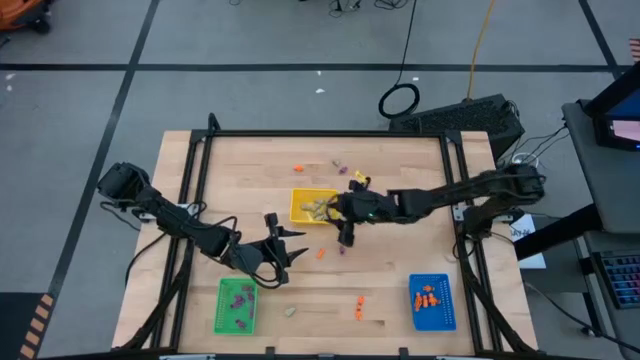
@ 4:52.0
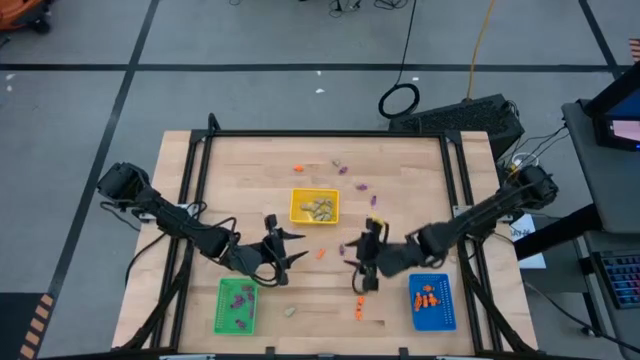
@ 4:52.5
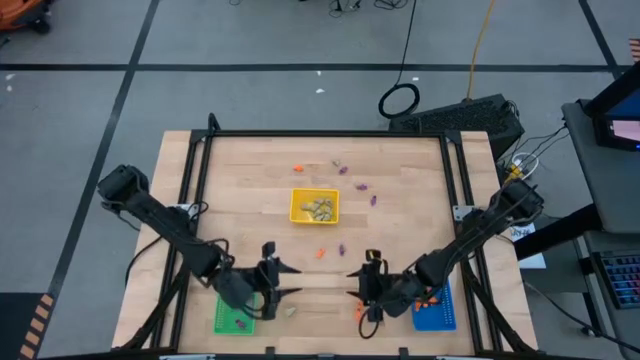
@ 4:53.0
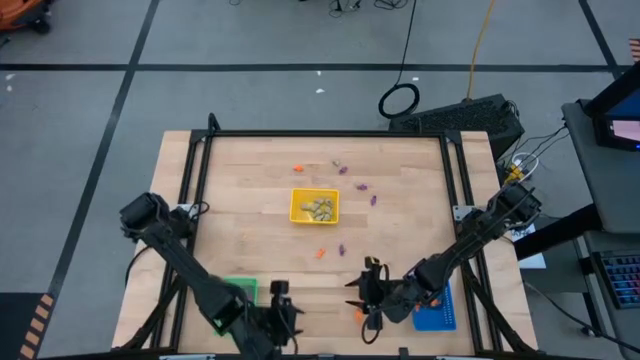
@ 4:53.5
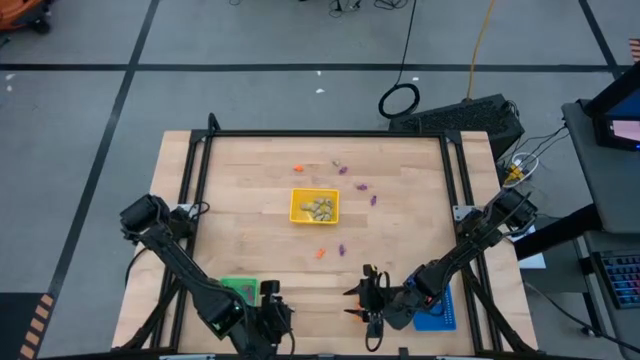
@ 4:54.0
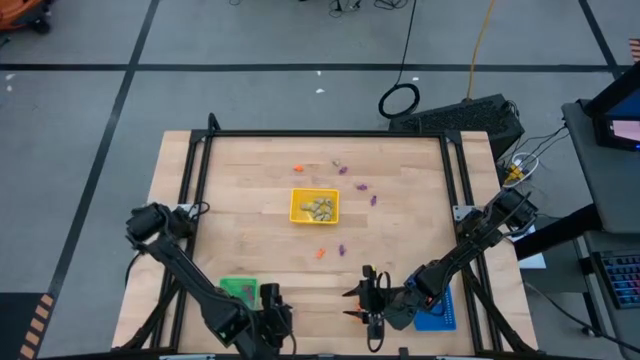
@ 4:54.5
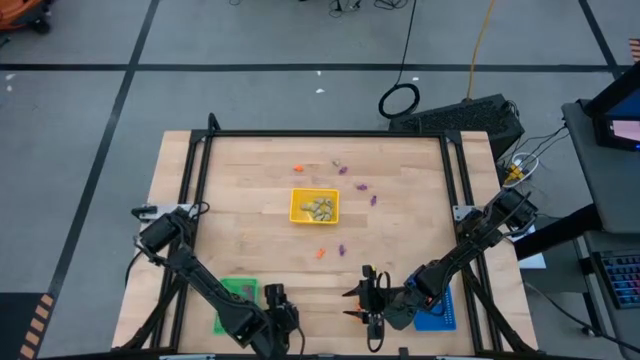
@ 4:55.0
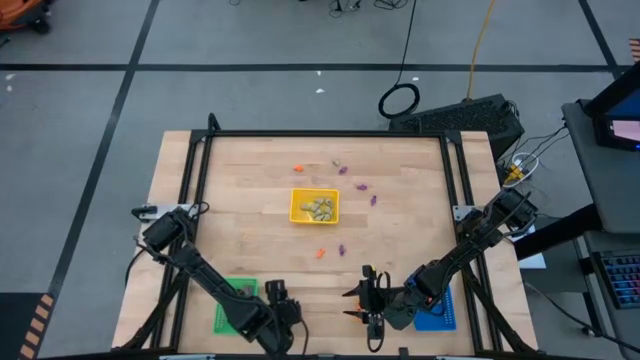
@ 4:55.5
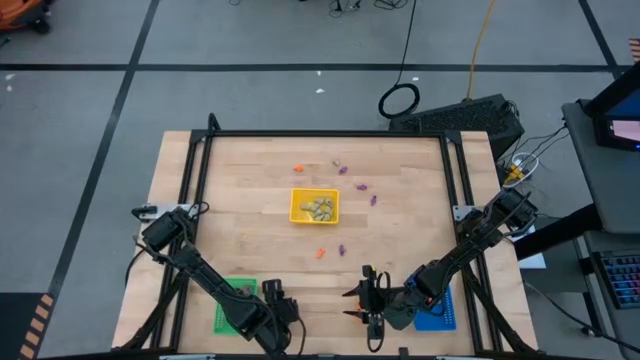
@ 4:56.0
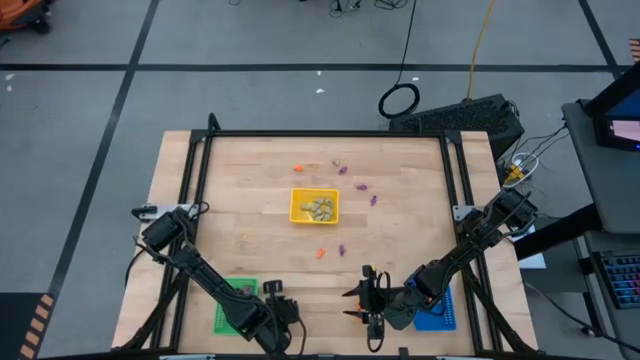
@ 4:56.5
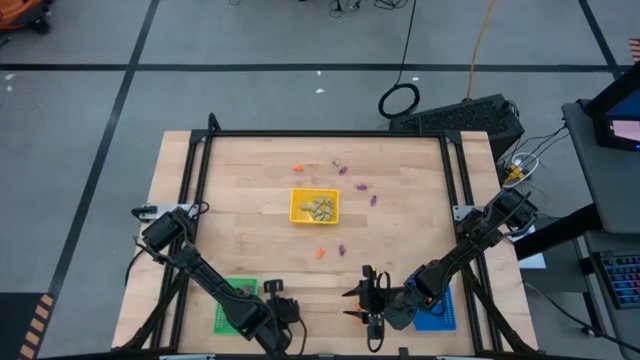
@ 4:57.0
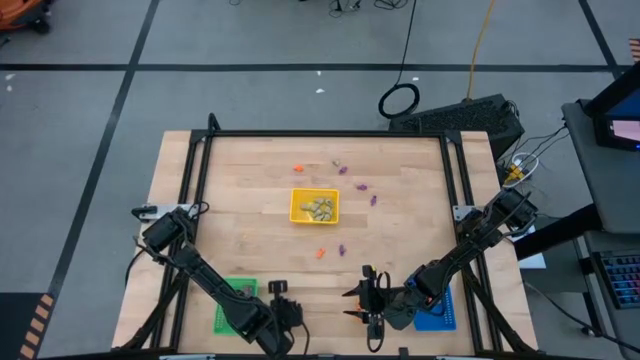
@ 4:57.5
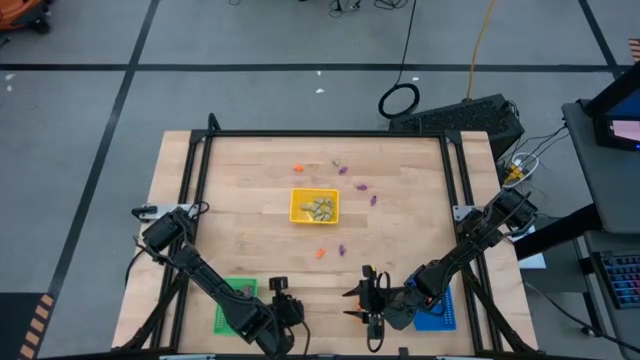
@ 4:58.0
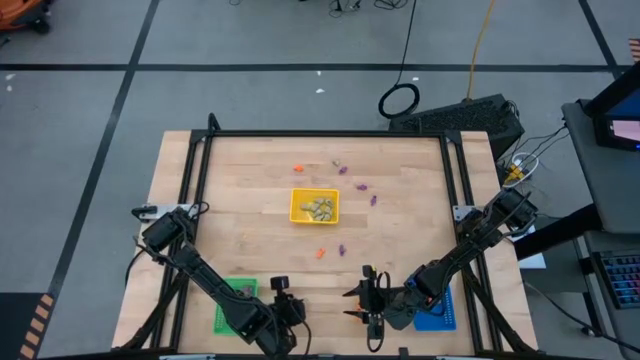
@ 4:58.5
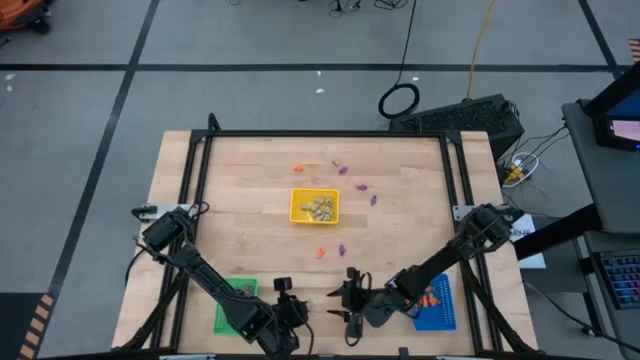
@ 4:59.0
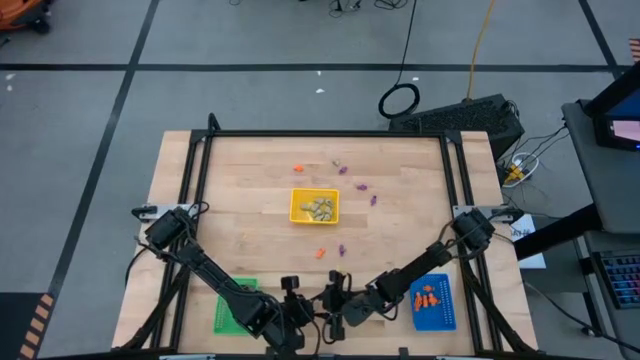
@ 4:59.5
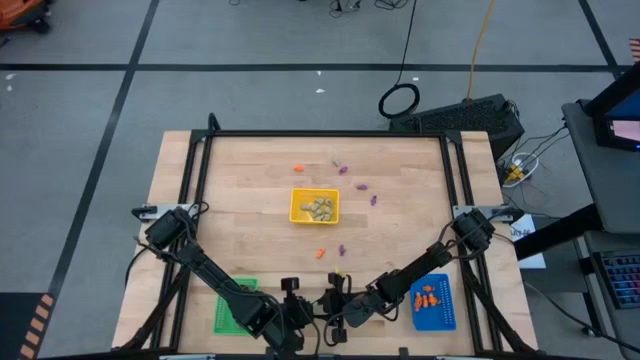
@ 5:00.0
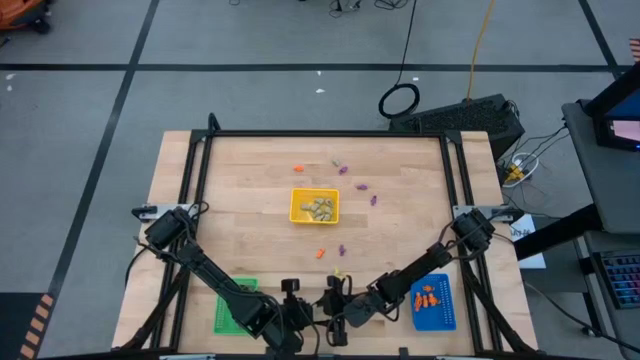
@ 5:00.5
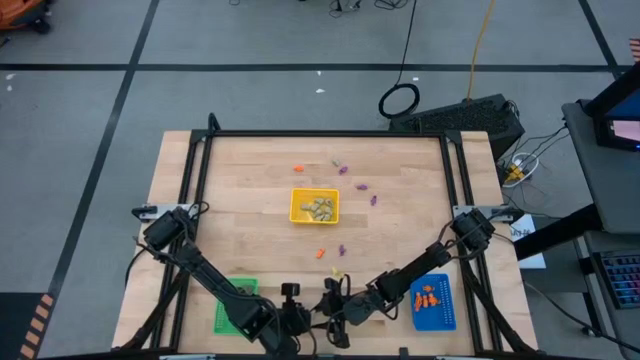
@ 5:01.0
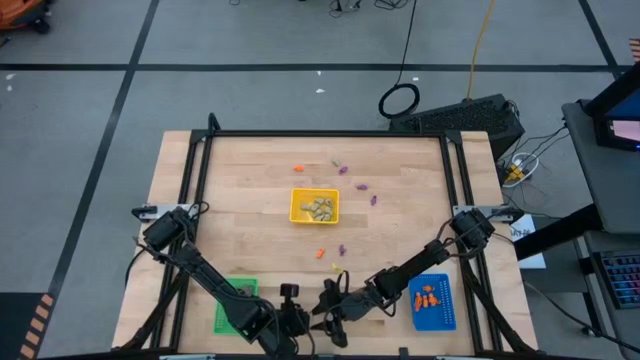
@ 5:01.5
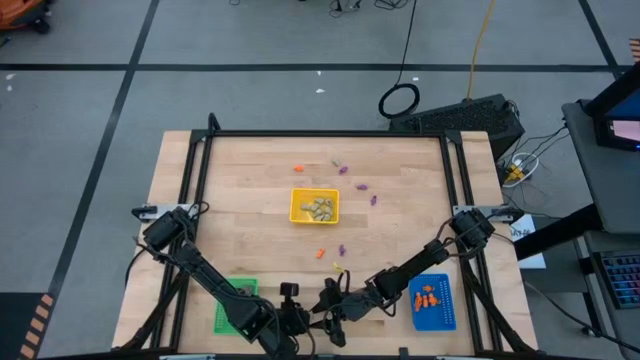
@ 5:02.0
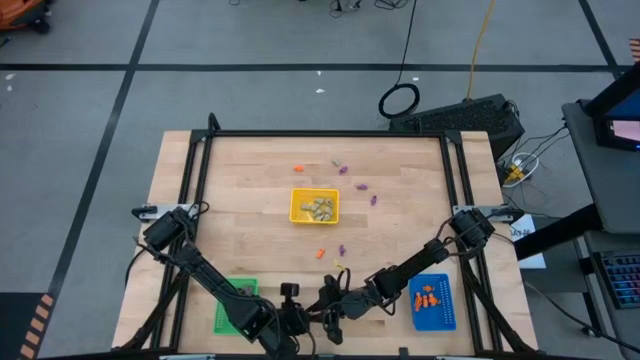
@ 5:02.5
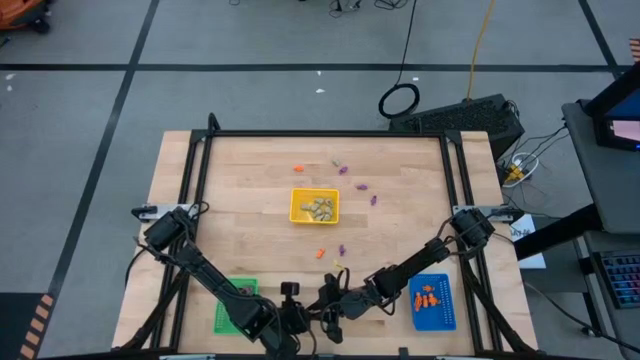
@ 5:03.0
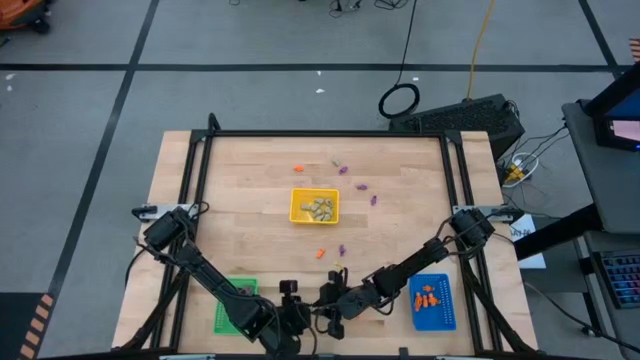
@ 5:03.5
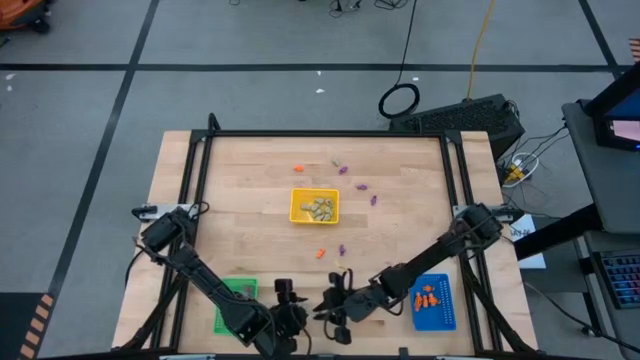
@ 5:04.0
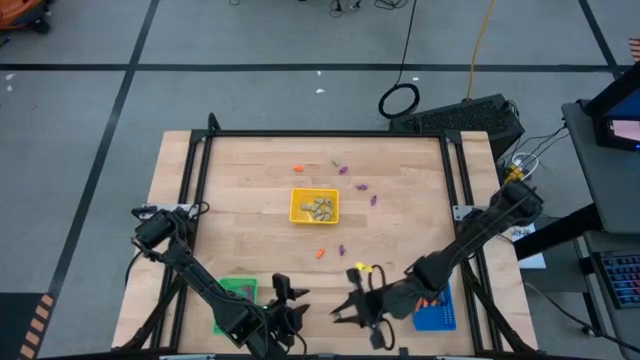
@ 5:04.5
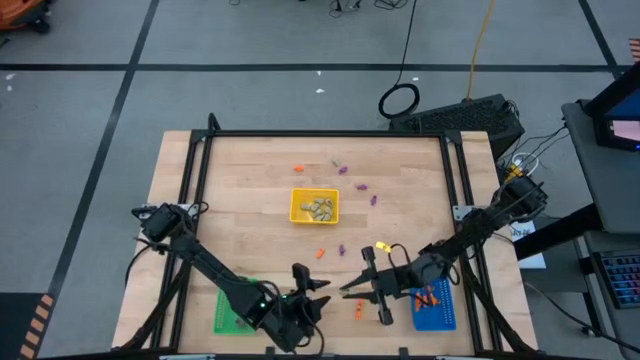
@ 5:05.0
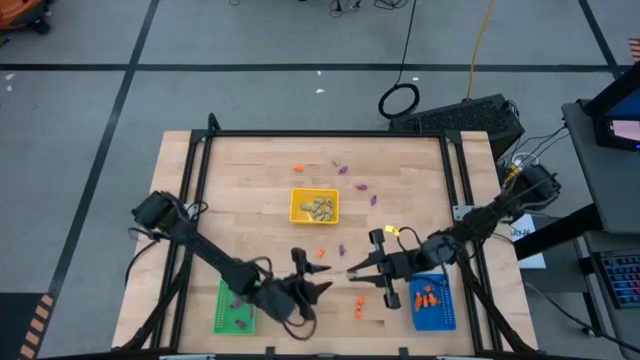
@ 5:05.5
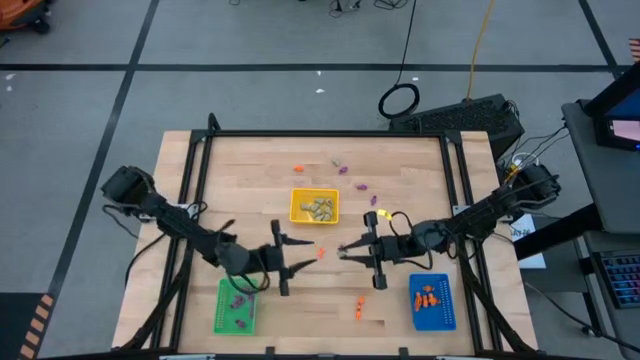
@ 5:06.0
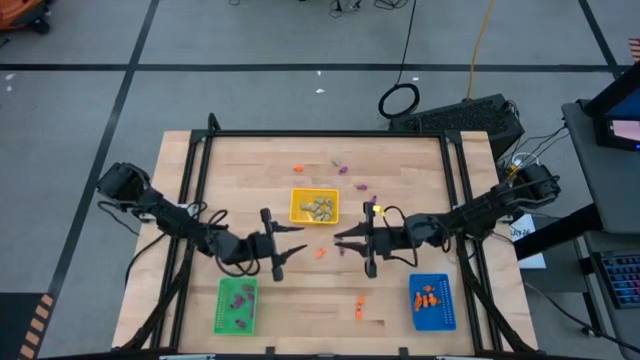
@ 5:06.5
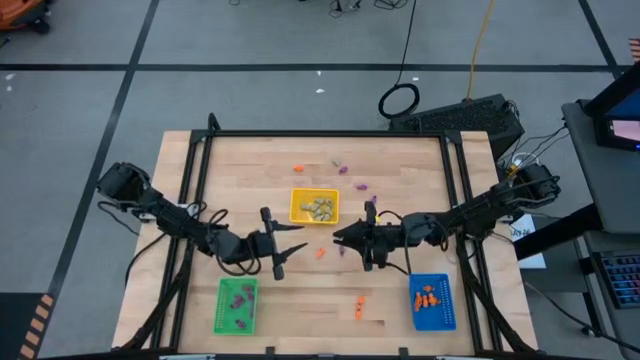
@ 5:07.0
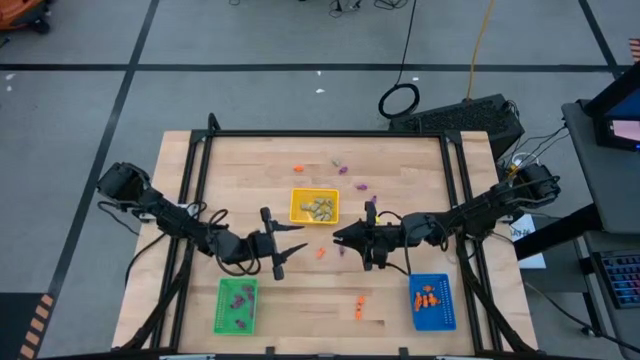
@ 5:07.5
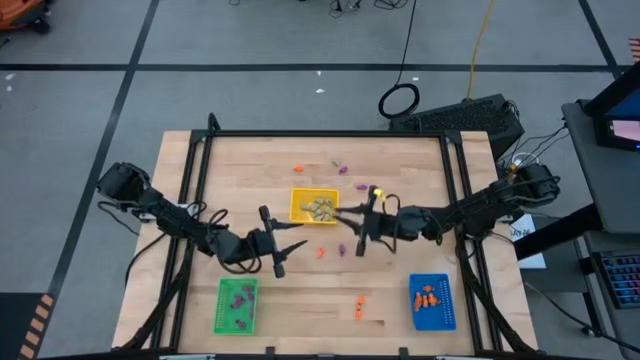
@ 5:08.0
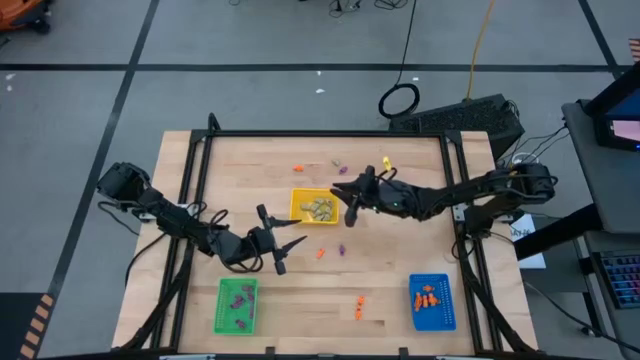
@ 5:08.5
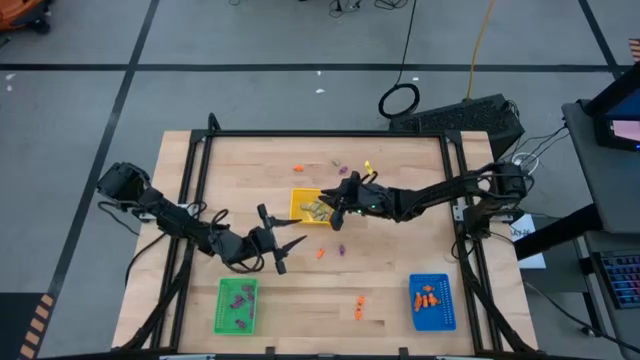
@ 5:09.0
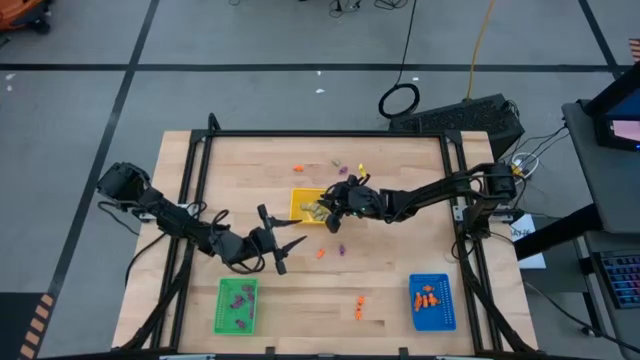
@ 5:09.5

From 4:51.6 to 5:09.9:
Task: Sort Halloween decoration
Put the white skull toy in the yellow basket
